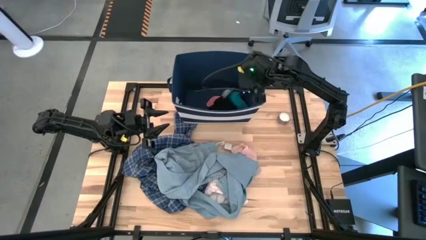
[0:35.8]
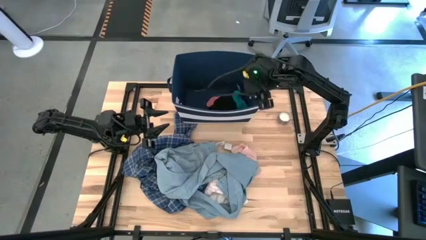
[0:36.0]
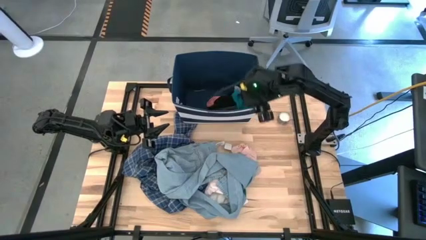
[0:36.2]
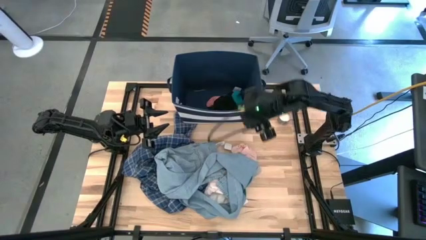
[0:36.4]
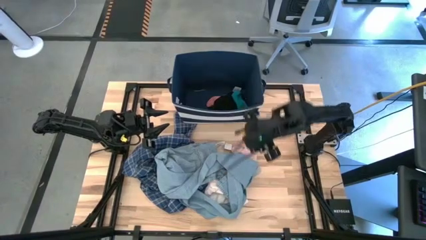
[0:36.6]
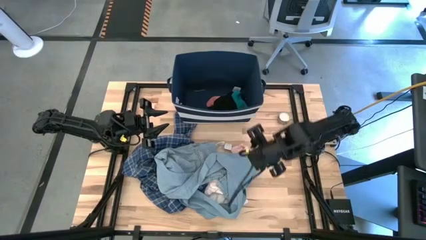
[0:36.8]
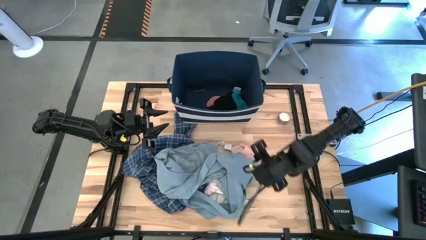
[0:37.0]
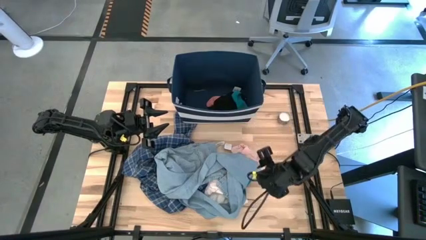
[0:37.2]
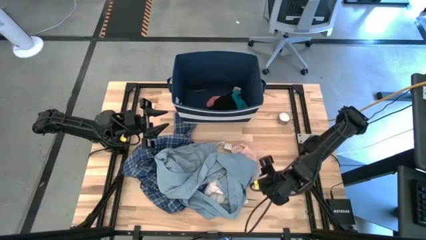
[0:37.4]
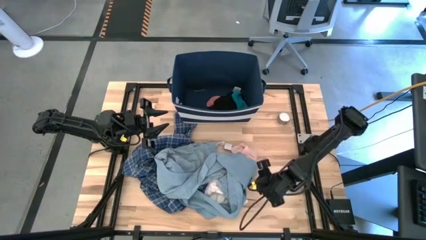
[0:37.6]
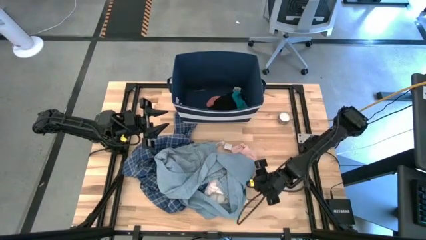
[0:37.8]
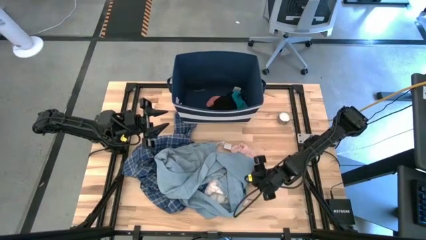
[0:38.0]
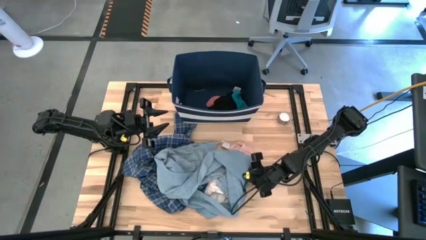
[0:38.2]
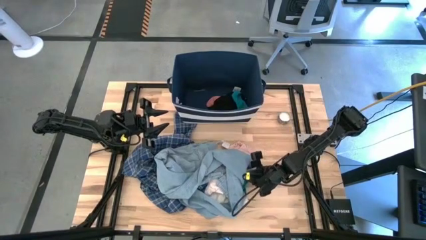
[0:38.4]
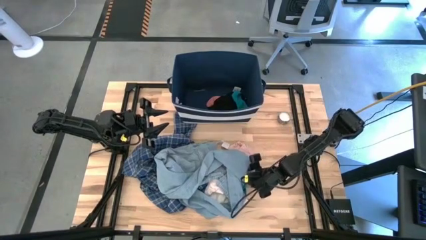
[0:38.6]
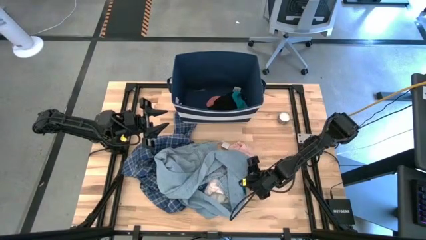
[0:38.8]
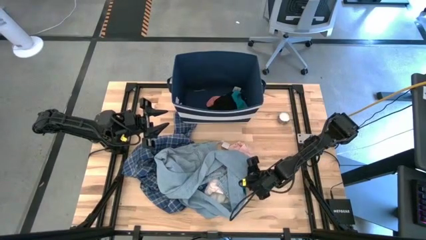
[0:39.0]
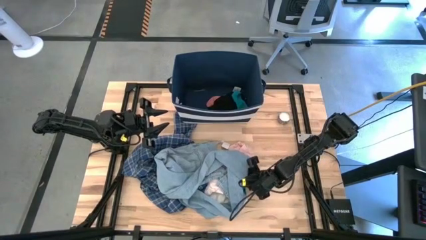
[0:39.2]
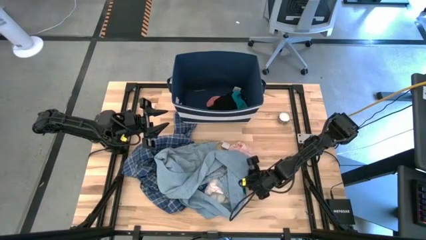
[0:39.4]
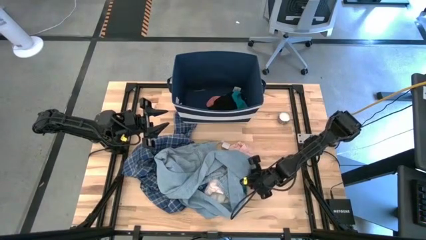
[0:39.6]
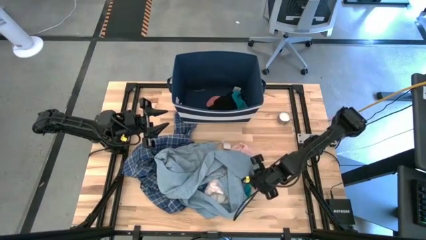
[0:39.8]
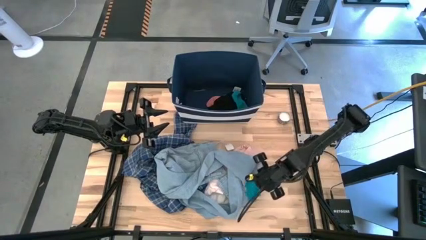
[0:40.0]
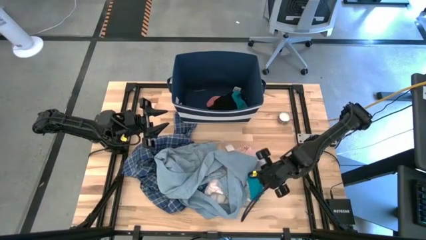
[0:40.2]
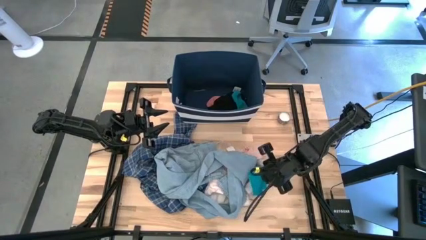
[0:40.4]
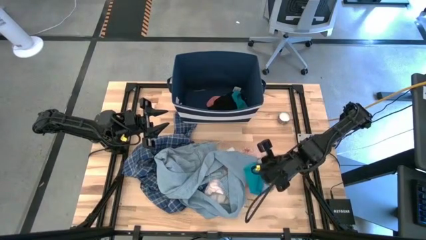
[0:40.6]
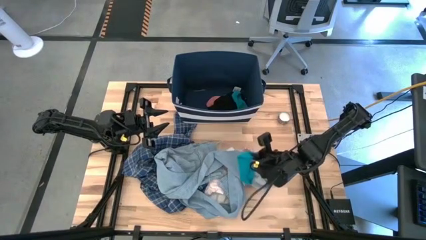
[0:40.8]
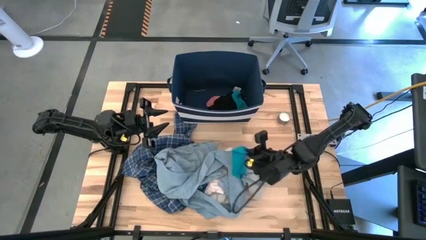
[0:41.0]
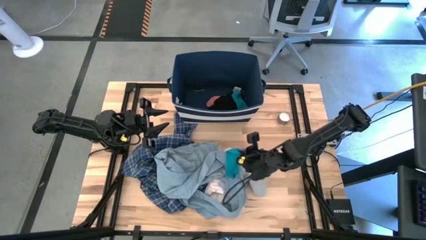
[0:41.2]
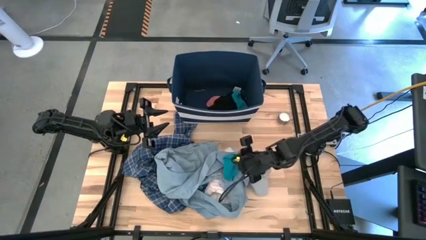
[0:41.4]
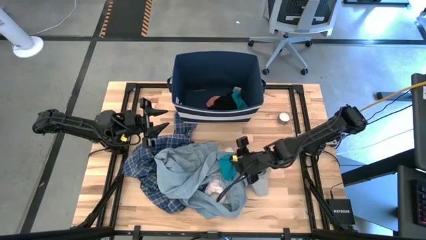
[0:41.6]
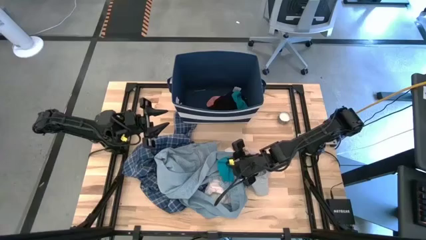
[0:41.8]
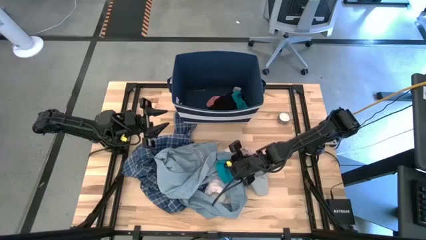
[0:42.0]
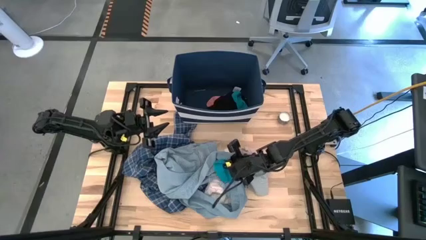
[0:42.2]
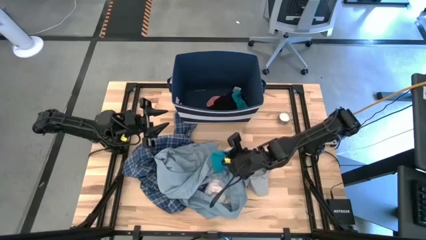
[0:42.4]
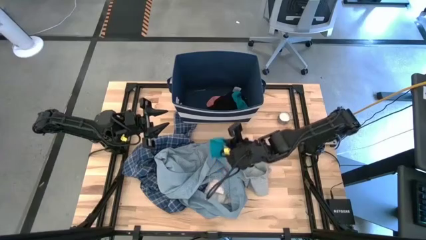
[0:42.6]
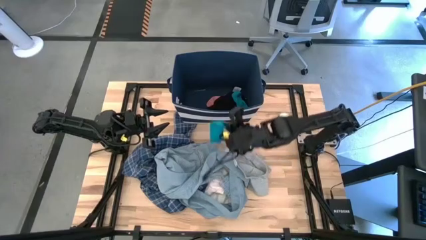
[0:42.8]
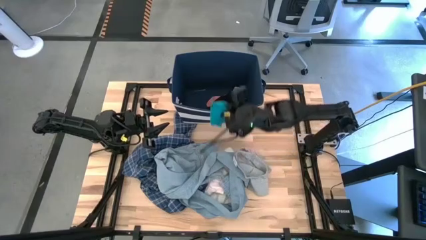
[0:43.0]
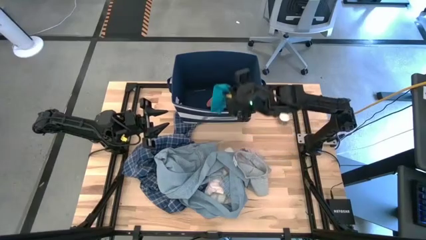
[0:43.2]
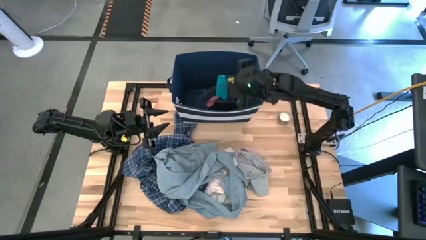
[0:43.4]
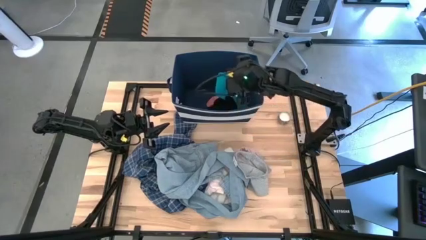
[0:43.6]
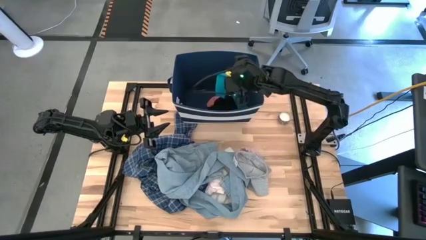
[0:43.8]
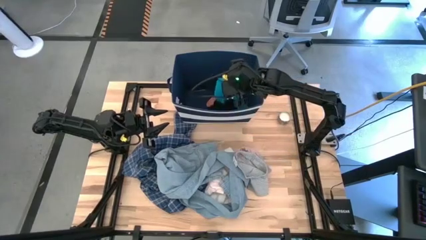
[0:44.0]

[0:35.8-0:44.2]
Task: Sort clothes
Put the blue sock into the blue laundry bin

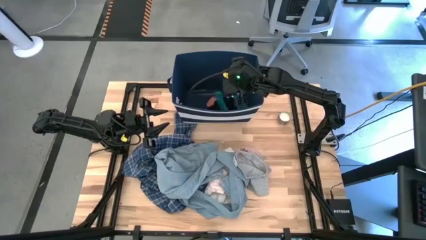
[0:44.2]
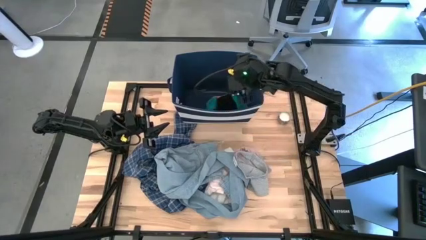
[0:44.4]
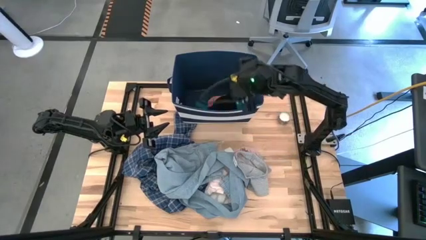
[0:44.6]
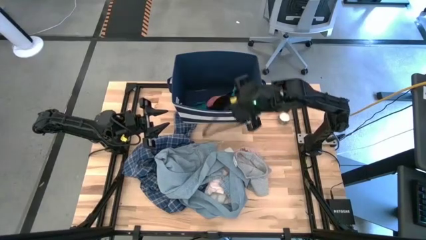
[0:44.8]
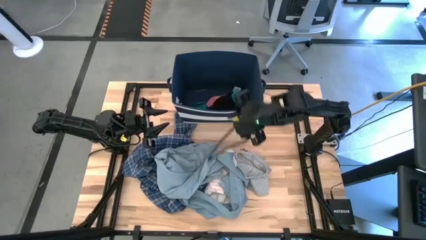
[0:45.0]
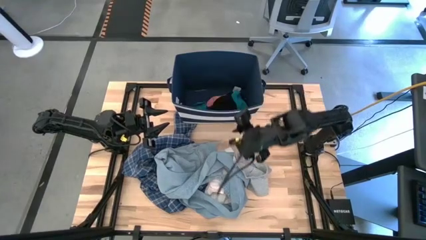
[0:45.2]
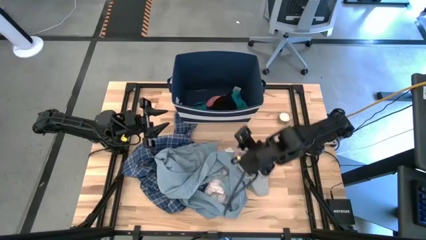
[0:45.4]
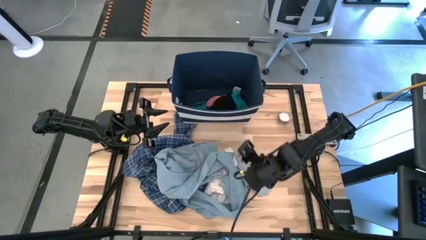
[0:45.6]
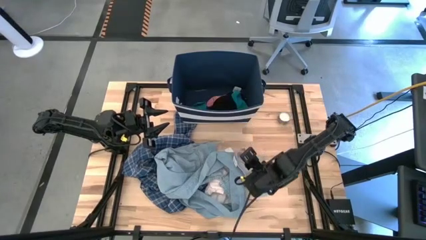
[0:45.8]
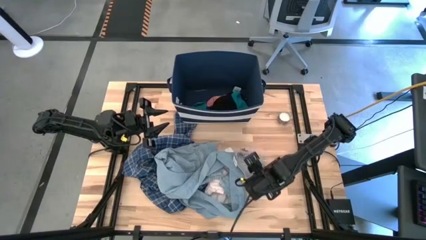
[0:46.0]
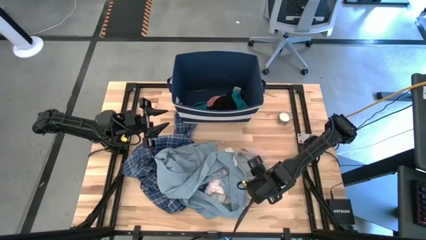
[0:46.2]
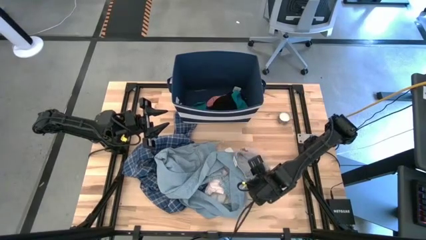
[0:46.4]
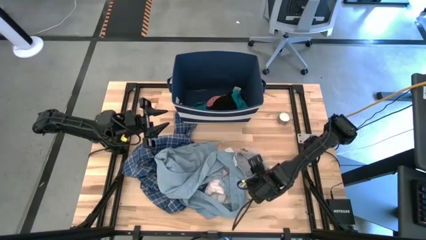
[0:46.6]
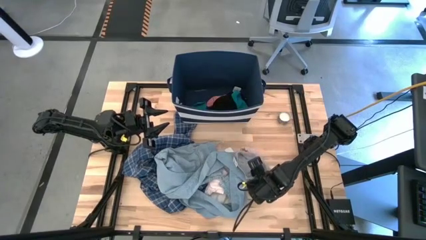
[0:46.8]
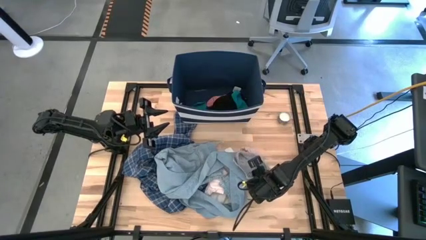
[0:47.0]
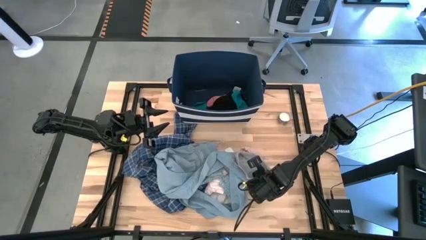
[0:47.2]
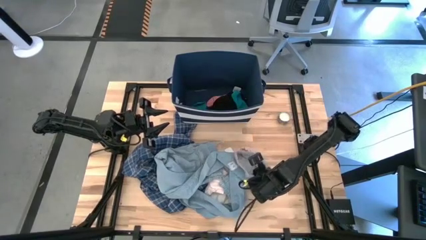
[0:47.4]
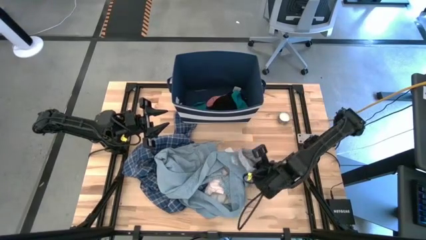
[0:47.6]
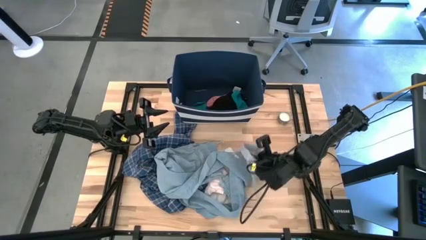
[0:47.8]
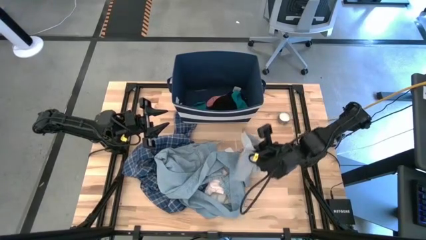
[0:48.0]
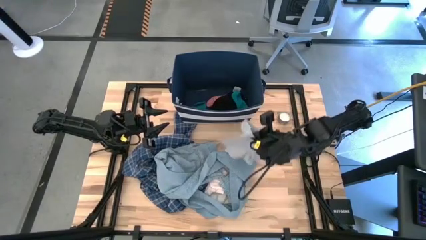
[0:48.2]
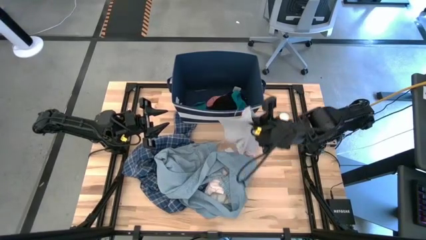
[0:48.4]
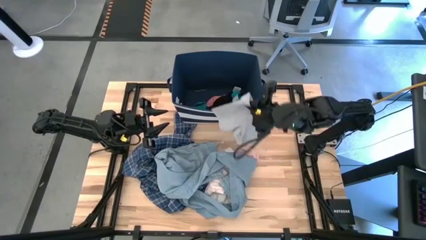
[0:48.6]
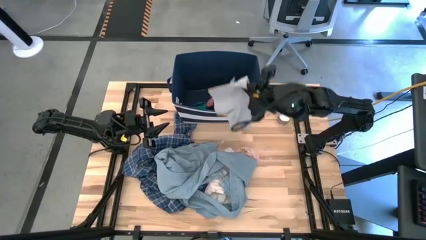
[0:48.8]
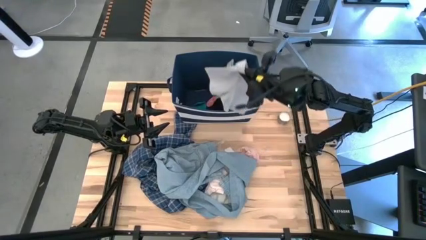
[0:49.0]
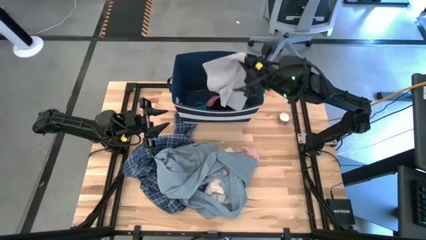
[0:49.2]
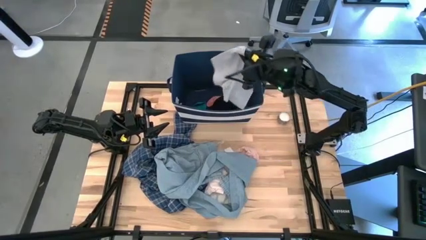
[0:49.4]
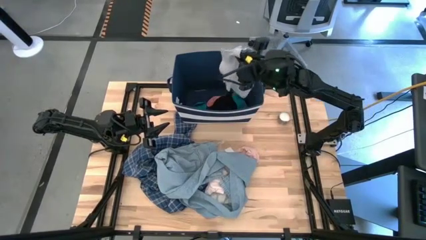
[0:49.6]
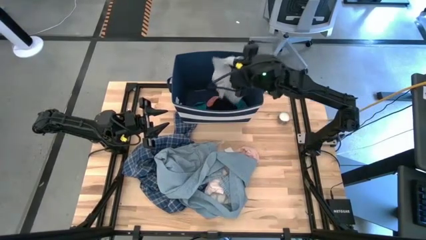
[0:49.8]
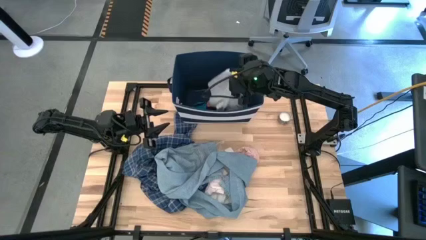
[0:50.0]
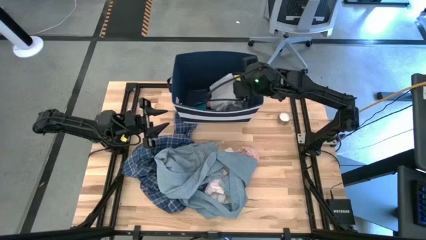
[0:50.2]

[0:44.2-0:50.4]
Put the gray shorts into the blue laundry bin

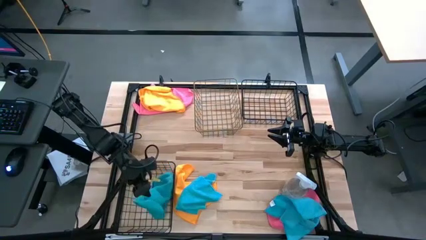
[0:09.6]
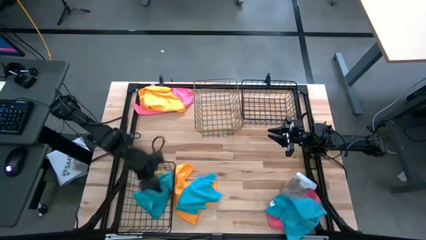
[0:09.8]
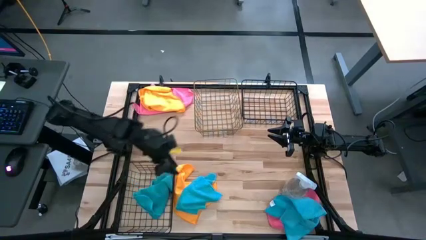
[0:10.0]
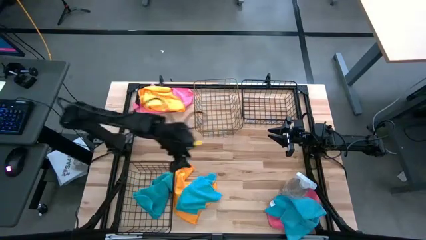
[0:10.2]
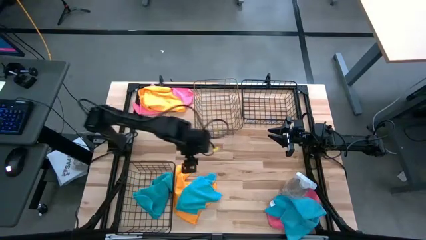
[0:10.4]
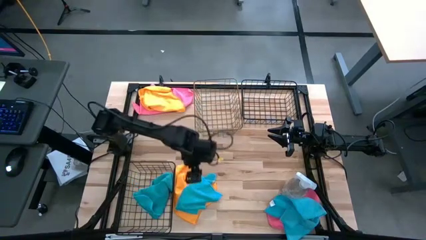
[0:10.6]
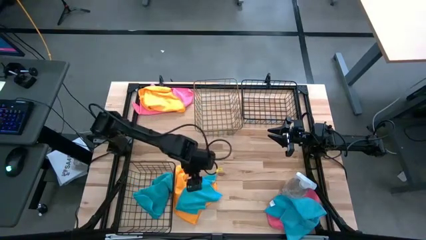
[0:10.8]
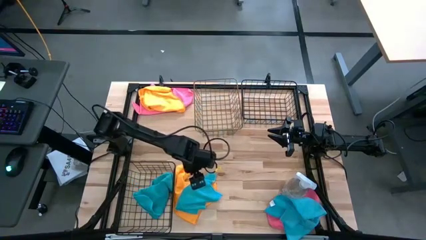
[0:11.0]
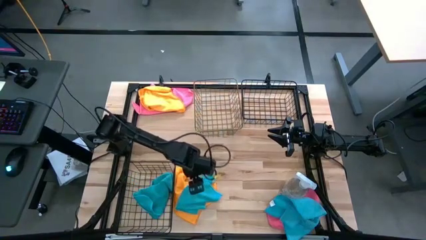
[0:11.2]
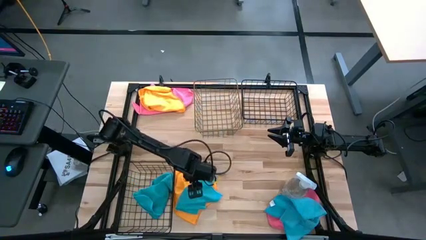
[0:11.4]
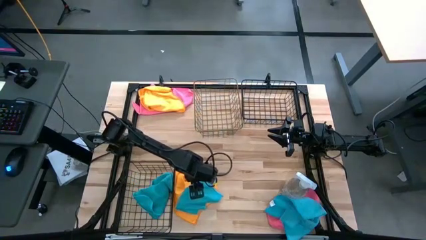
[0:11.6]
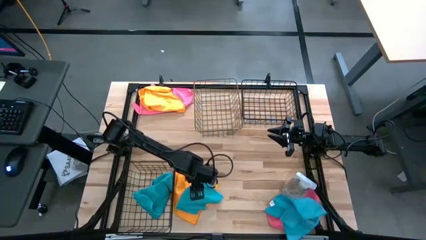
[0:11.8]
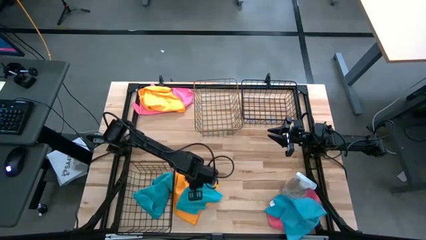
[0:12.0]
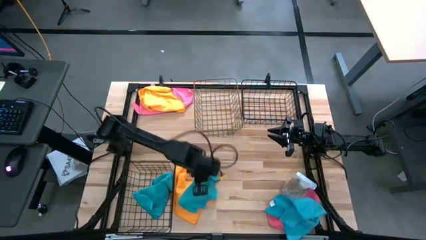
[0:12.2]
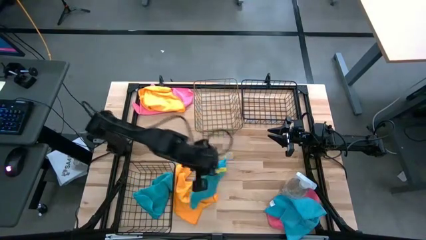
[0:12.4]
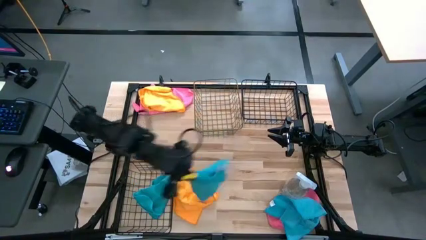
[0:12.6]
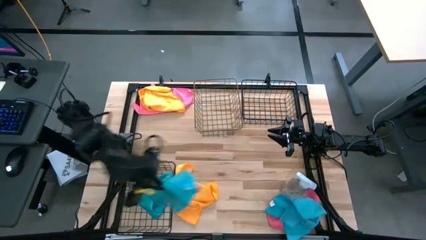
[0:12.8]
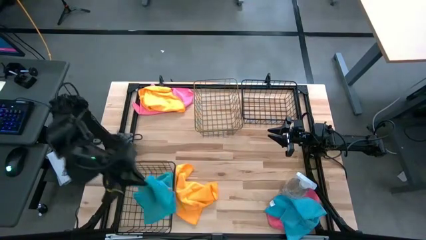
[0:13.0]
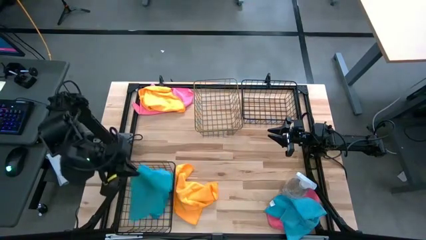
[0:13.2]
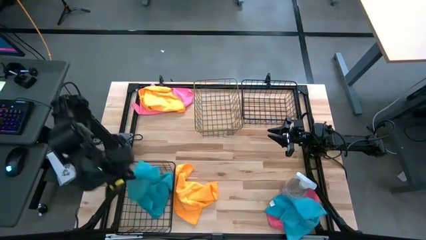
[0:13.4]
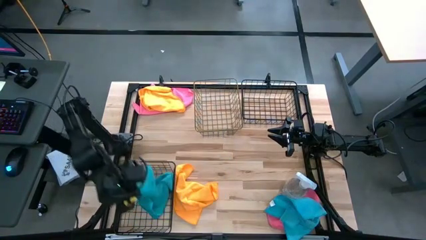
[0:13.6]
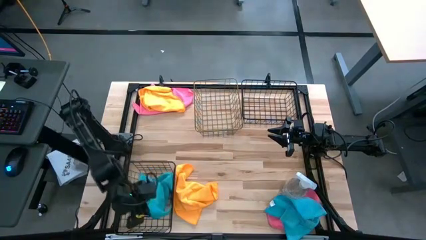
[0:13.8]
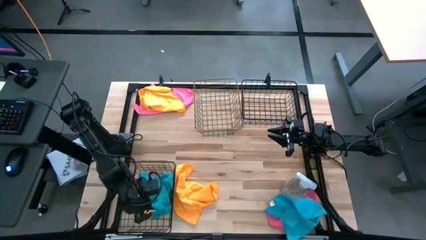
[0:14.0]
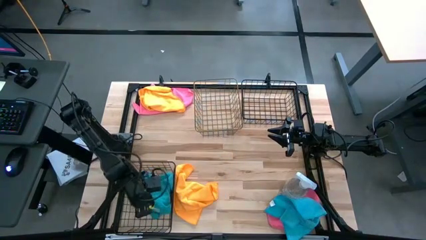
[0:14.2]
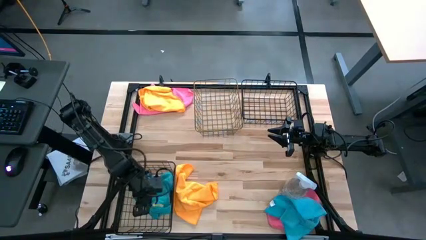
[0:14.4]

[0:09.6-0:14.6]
Task: Sort microfiber towel by color & place in baskets
Put the left blue towel into the bottom black wire basket
